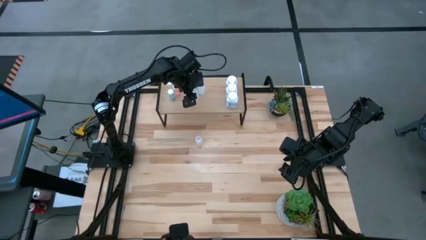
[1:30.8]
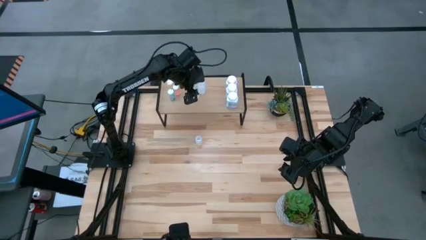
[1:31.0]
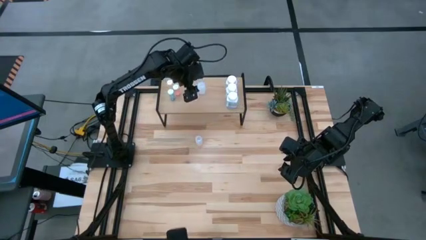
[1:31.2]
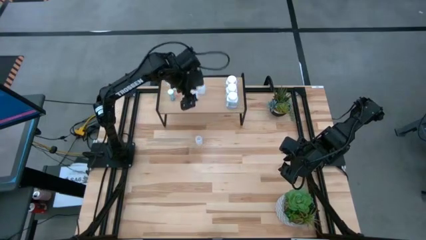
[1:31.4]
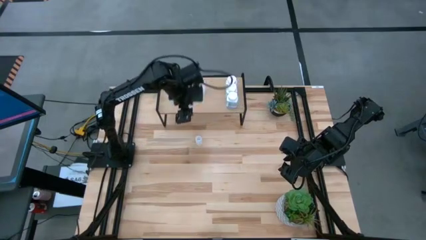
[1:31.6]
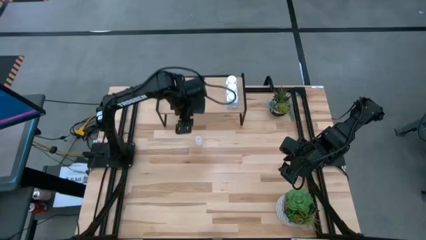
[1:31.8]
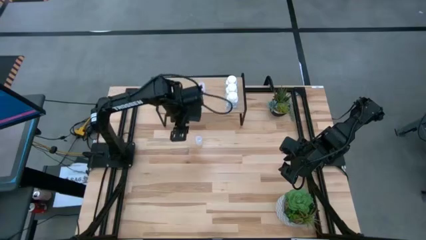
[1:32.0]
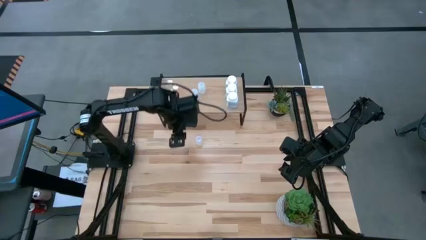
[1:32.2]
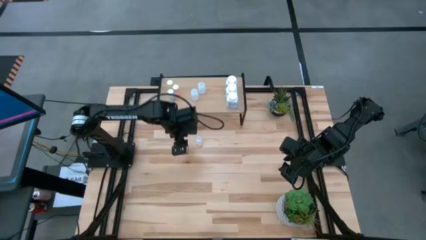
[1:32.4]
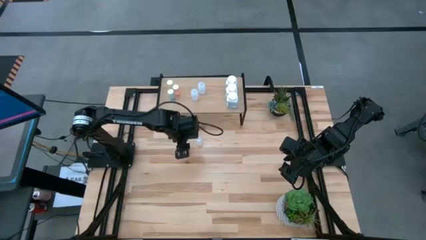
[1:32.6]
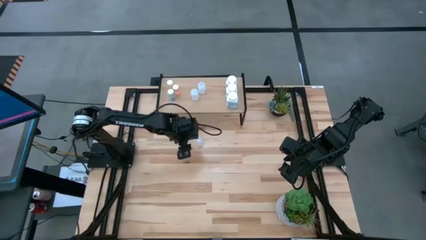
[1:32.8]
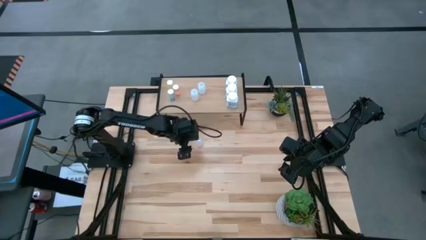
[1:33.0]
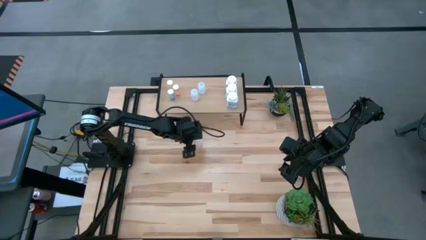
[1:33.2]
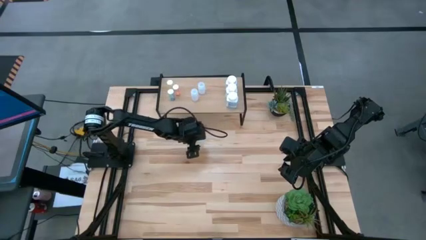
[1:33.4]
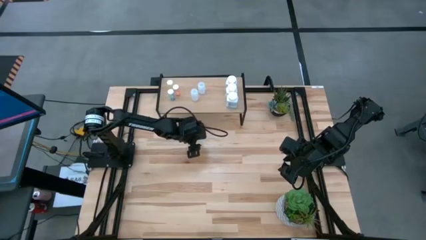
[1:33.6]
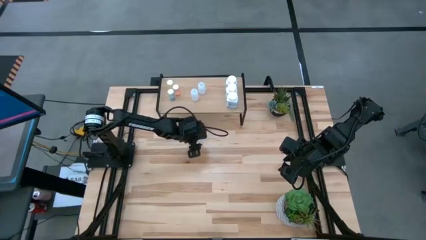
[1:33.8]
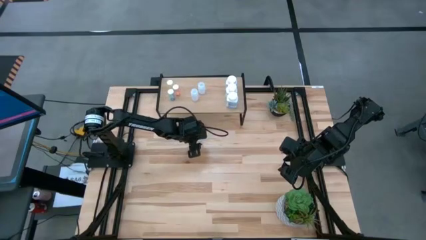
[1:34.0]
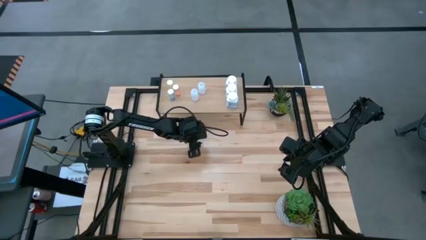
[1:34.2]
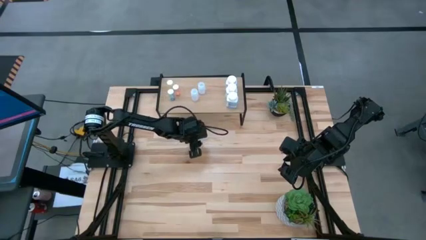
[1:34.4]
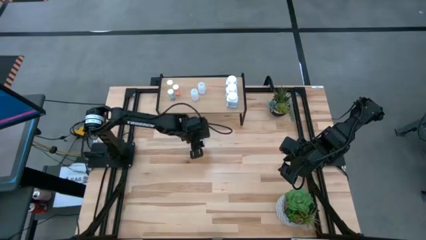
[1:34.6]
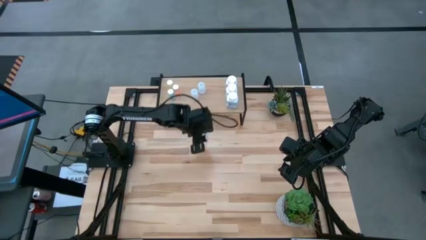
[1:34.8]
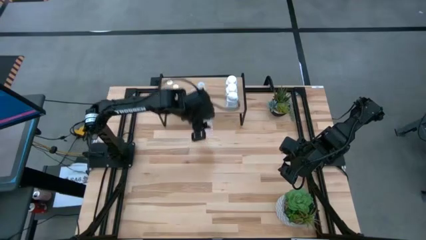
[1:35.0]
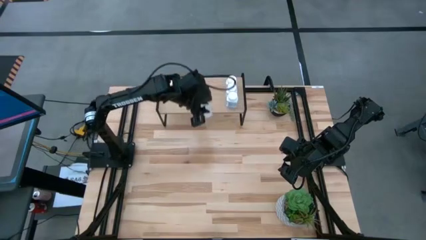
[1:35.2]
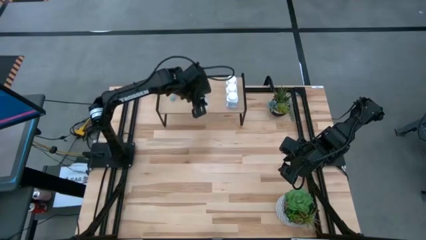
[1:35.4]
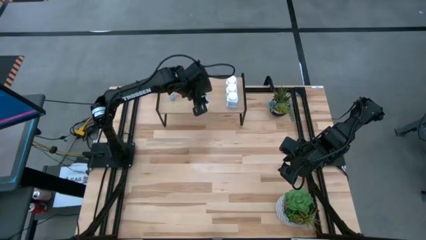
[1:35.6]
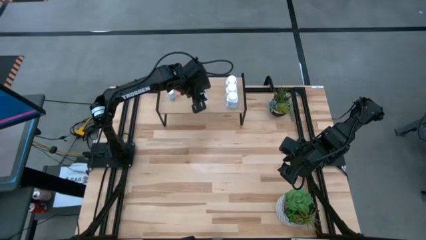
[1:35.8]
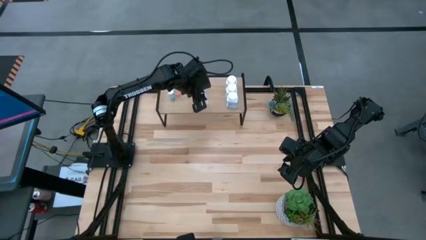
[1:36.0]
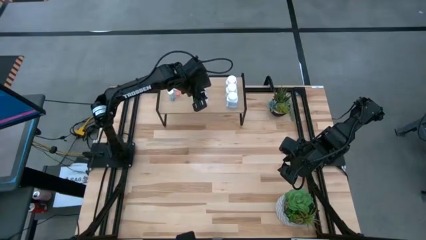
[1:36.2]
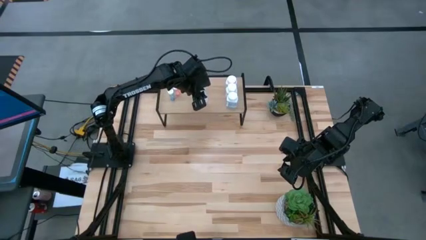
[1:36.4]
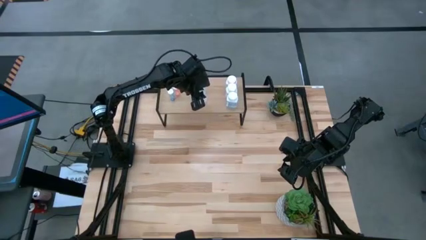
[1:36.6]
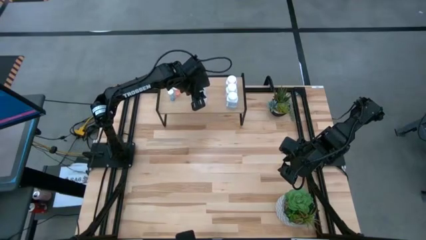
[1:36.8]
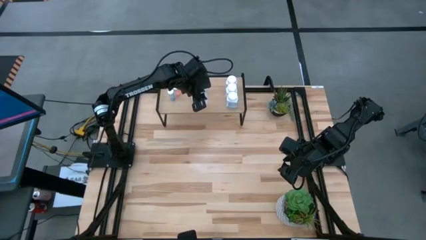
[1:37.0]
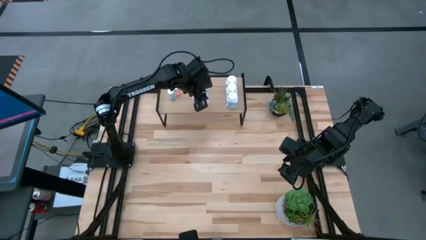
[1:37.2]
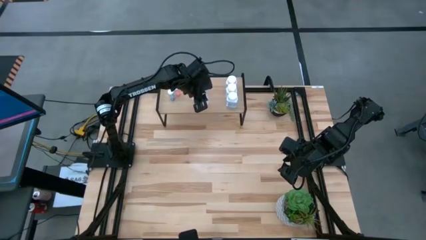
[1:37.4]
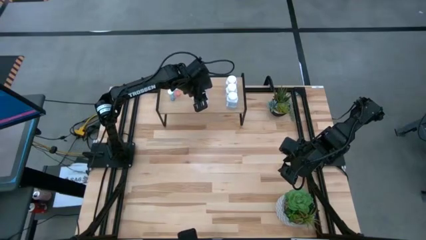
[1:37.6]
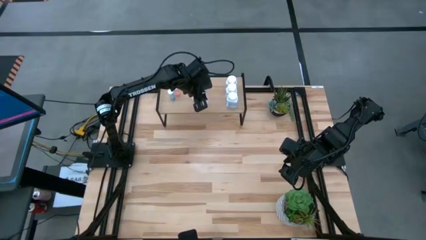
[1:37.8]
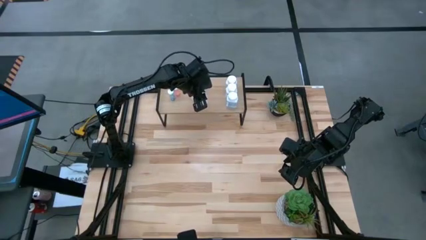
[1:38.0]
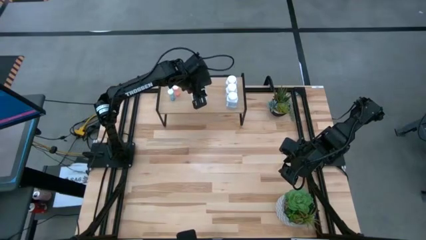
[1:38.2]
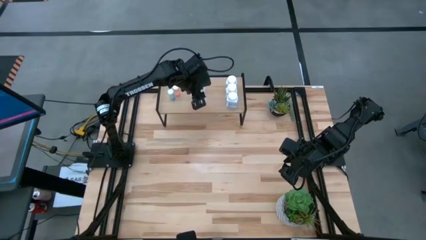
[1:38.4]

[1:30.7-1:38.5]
Task: Pick and place medicine bottles onto shelf by color
Put the small transparent pill bottle on the shelf aligned with the other small transparent pill bottles

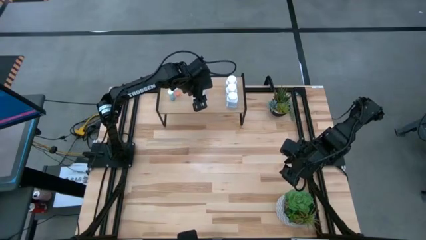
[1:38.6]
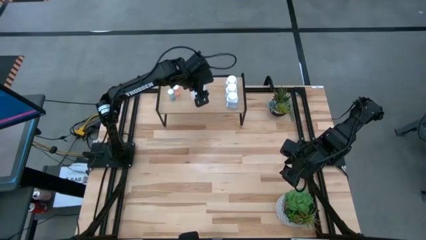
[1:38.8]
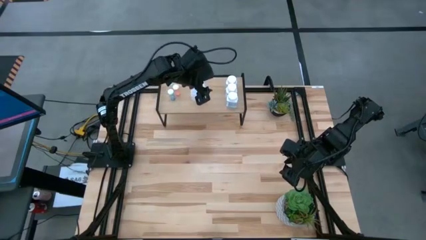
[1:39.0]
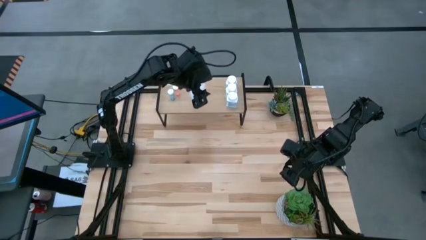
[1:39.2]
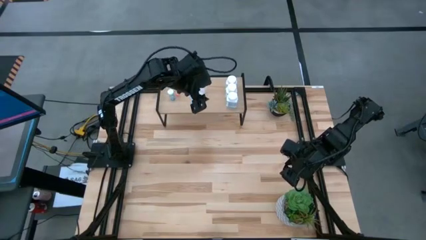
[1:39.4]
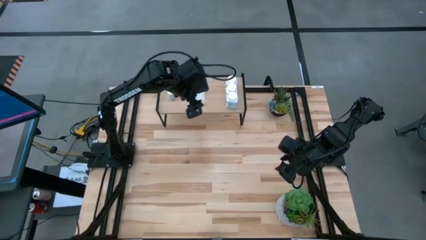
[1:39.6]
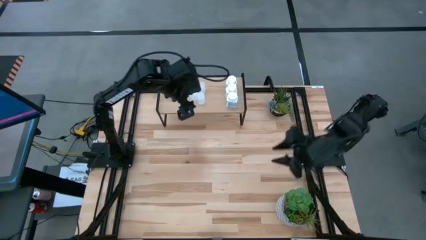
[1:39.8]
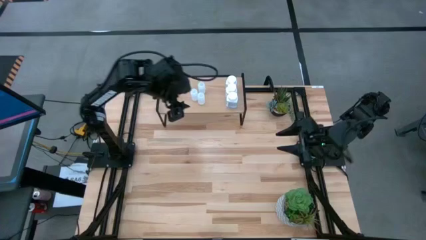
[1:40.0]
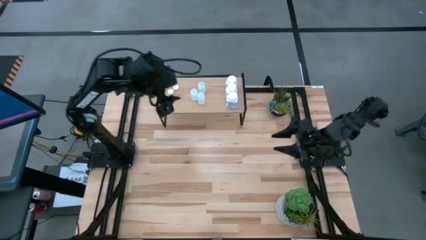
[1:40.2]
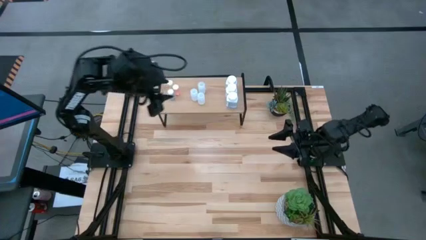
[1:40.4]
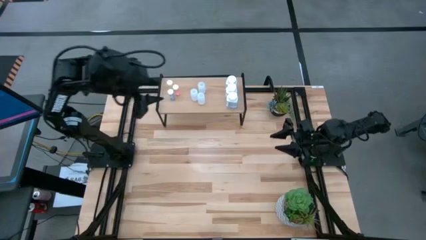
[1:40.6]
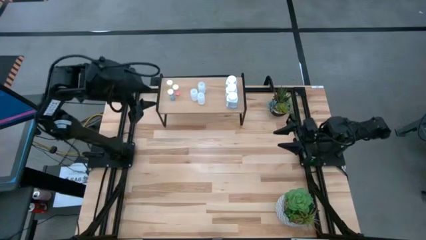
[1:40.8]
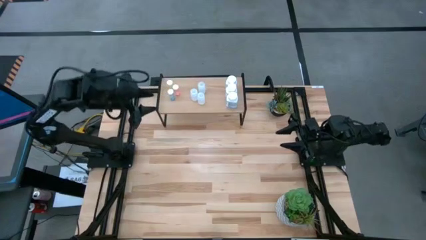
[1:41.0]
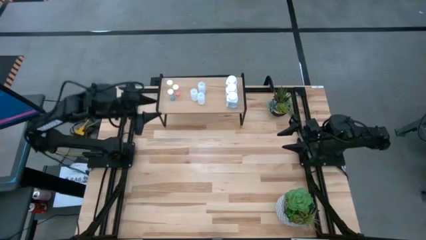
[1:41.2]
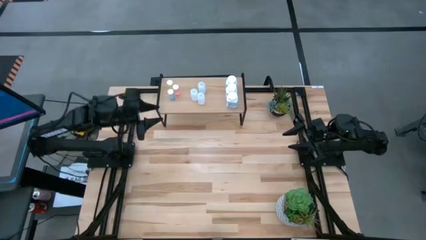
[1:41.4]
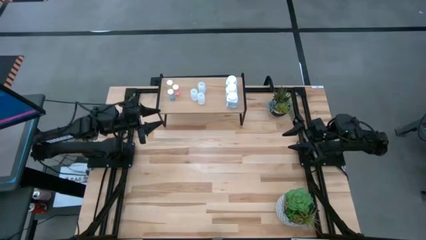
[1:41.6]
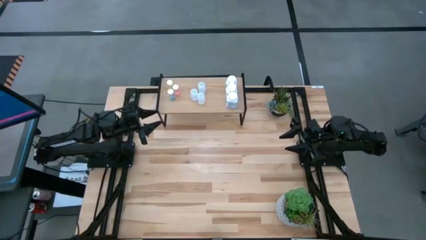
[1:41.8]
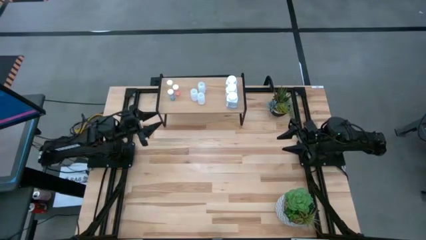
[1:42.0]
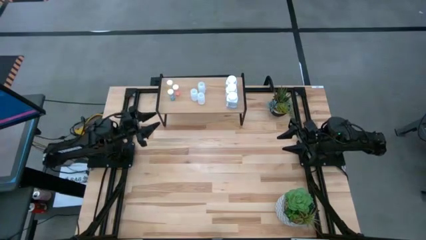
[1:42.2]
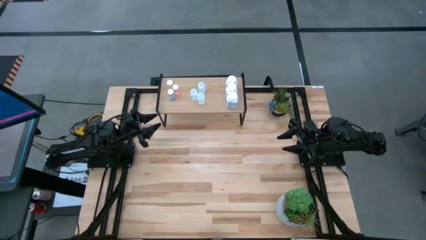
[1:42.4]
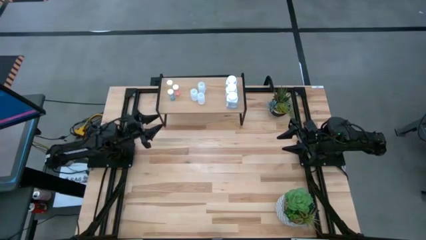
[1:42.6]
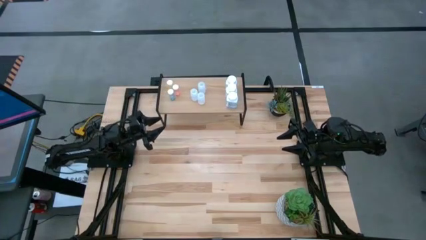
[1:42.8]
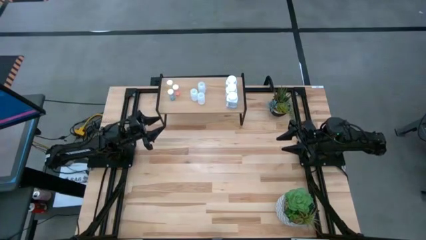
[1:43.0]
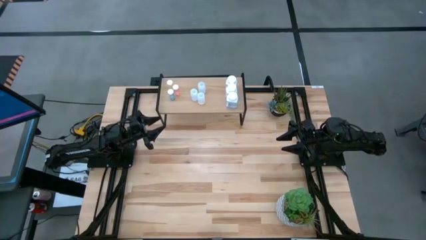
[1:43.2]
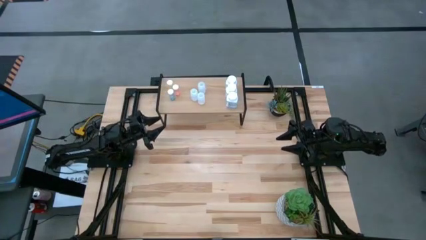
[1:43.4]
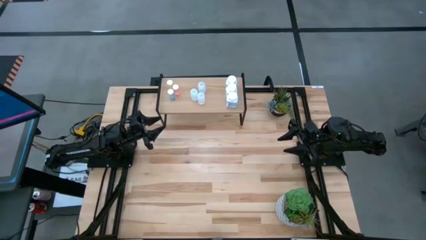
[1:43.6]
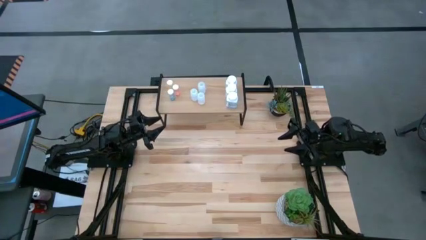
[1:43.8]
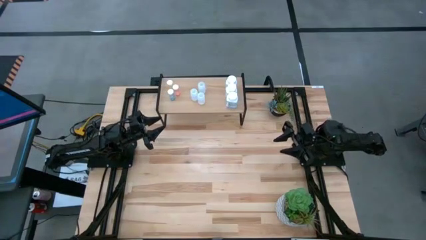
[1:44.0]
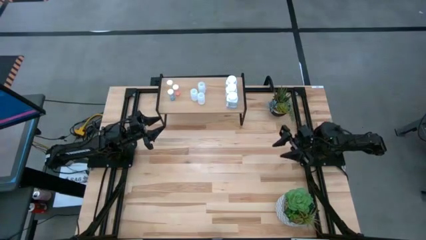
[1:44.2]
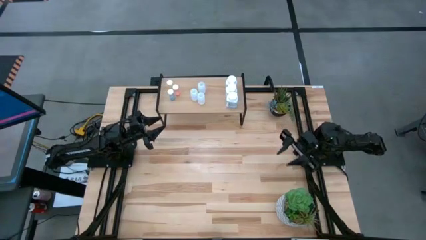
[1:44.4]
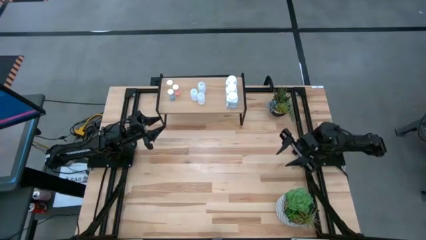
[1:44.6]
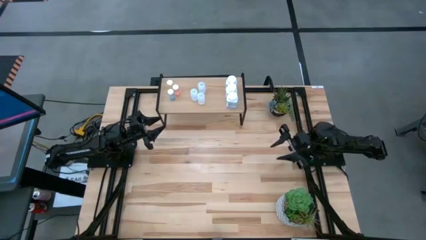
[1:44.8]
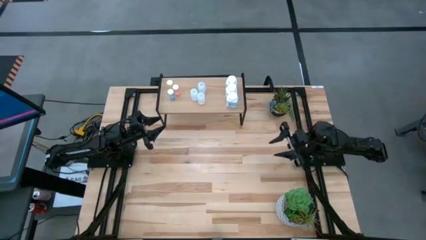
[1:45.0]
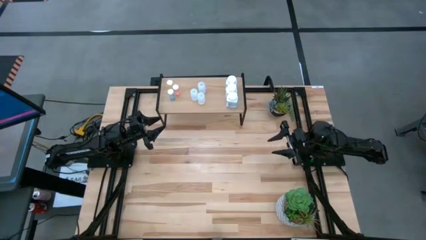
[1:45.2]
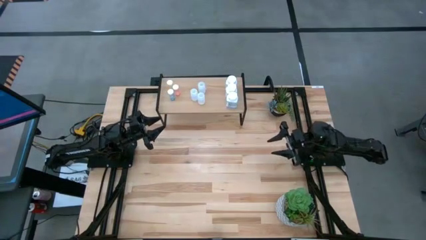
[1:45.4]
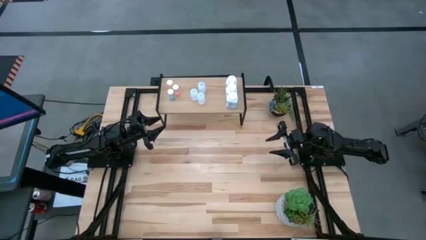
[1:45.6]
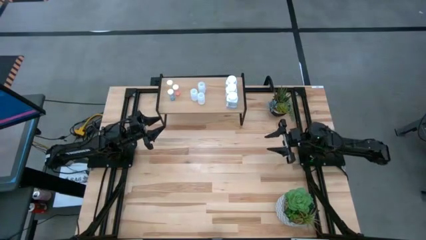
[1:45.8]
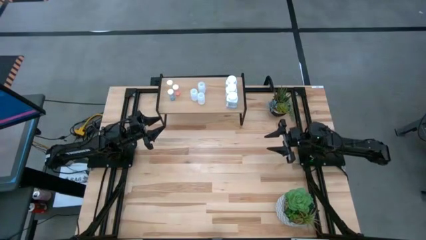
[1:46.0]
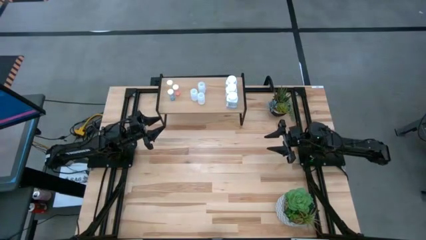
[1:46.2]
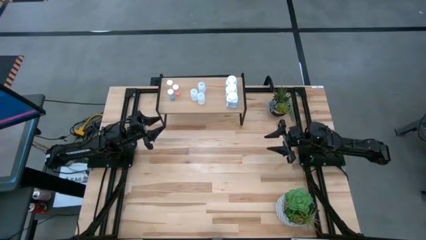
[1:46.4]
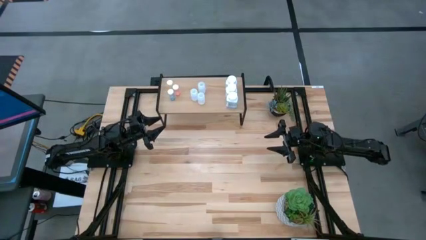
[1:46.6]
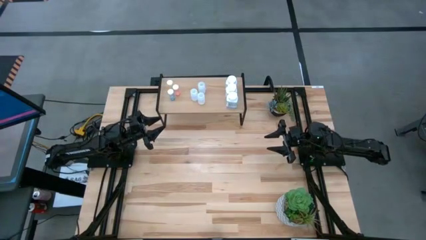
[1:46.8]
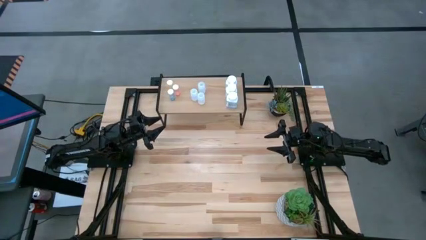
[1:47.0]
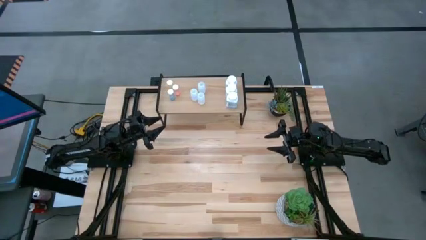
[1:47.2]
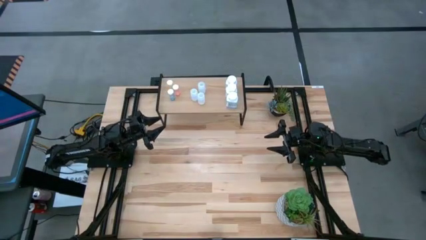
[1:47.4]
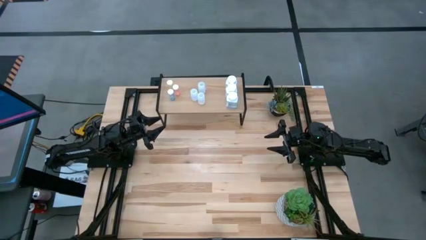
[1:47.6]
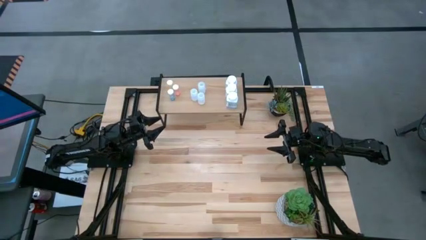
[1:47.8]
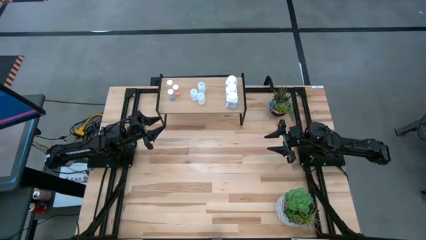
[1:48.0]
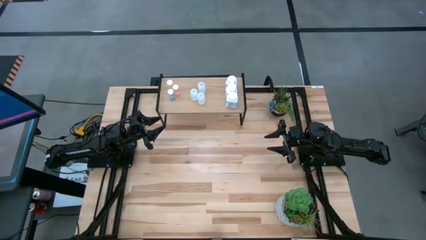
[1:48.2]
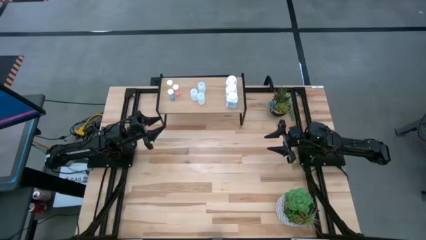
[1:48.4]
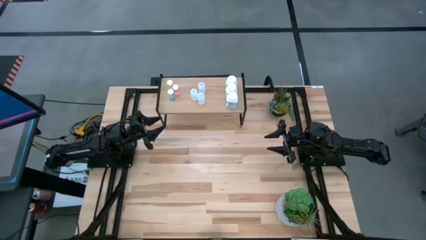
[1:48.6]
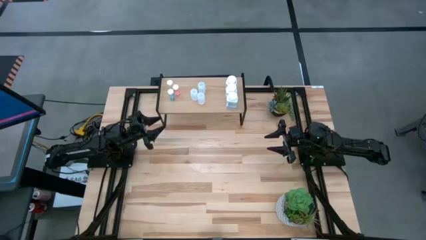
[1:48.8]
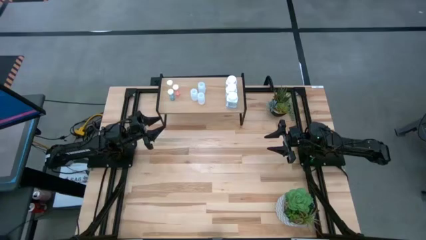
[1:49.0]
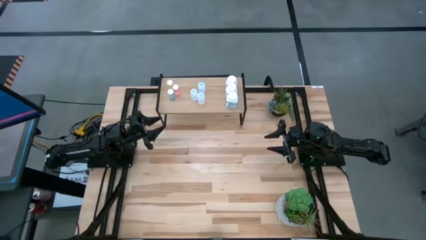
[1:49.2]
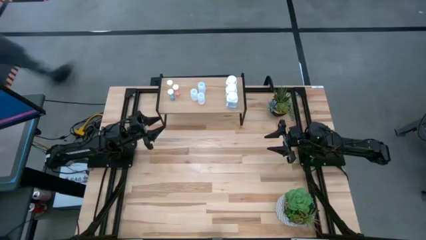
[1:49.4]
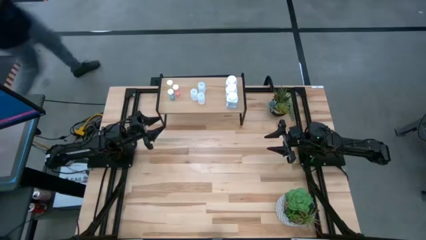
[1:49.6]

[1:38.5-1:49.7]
Return to Home Position
